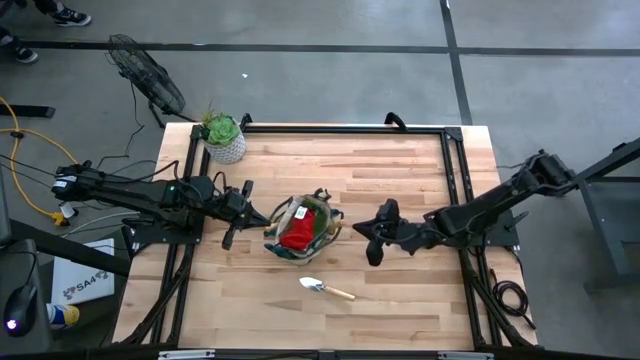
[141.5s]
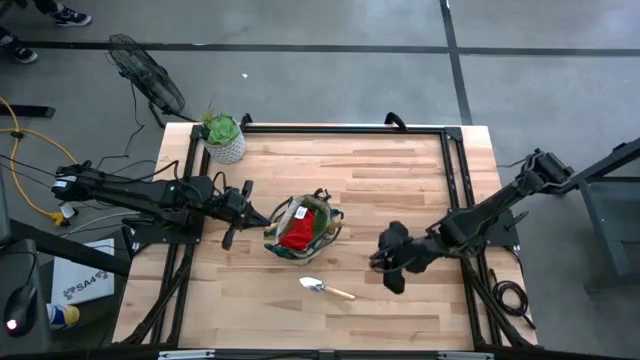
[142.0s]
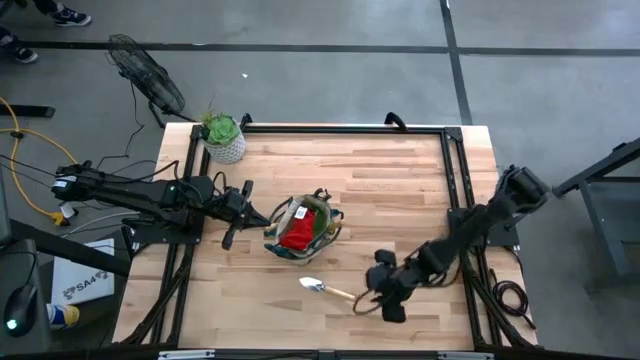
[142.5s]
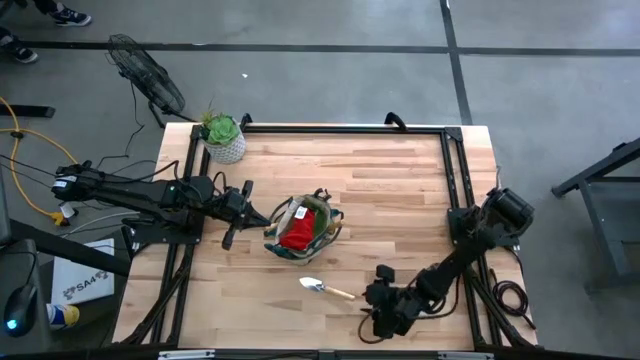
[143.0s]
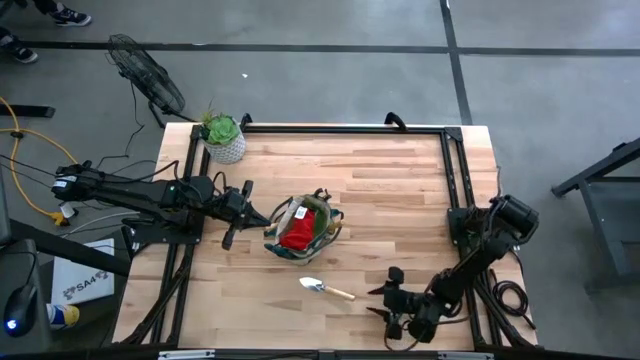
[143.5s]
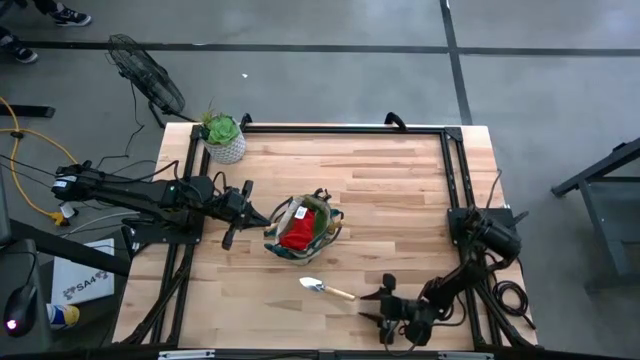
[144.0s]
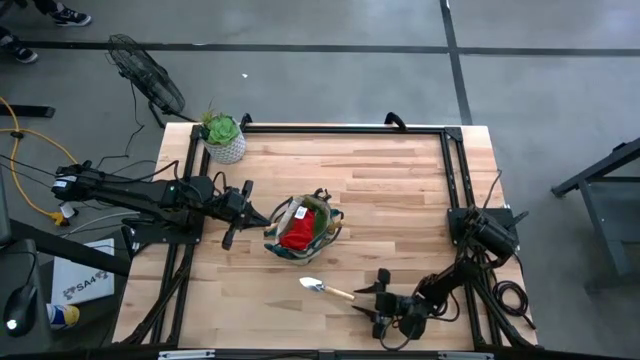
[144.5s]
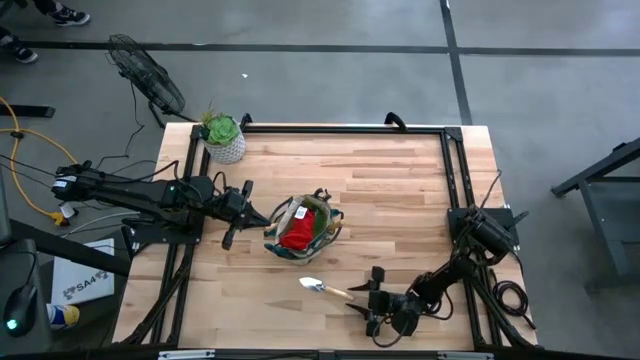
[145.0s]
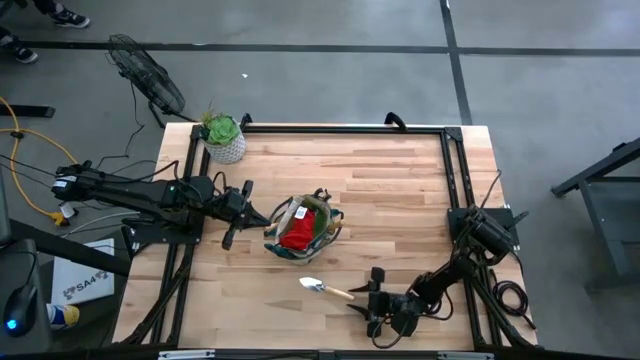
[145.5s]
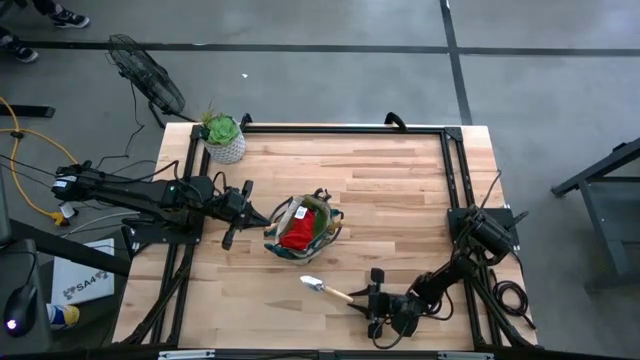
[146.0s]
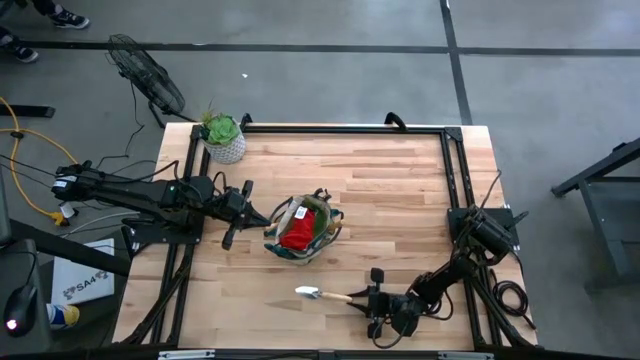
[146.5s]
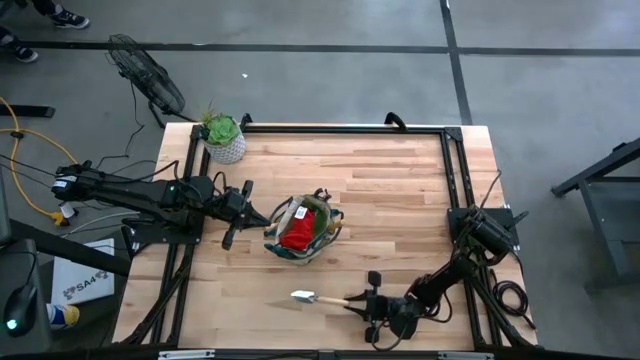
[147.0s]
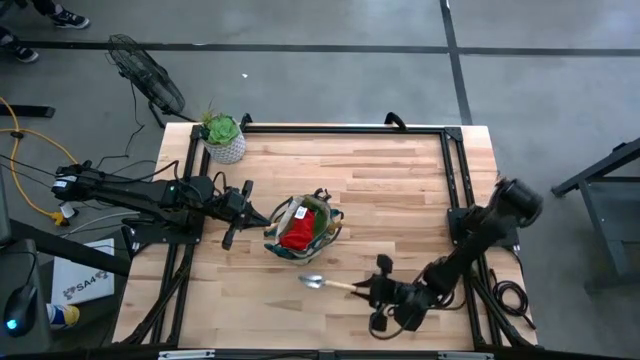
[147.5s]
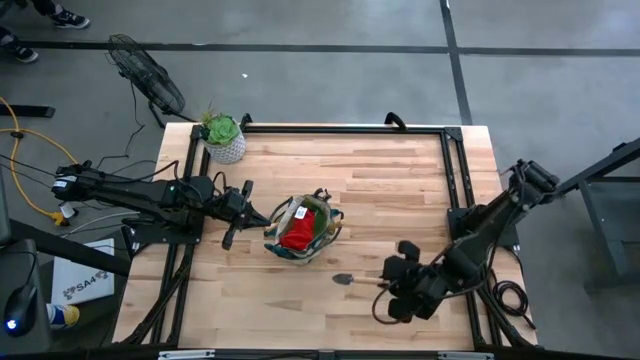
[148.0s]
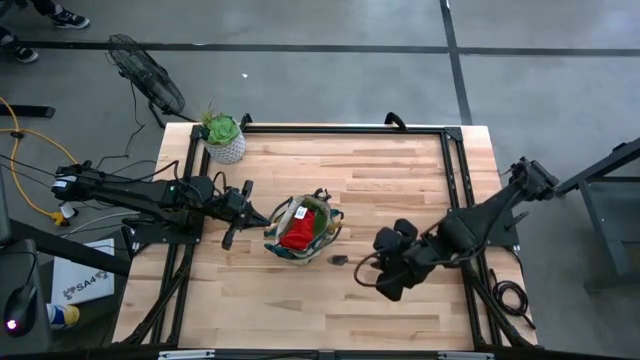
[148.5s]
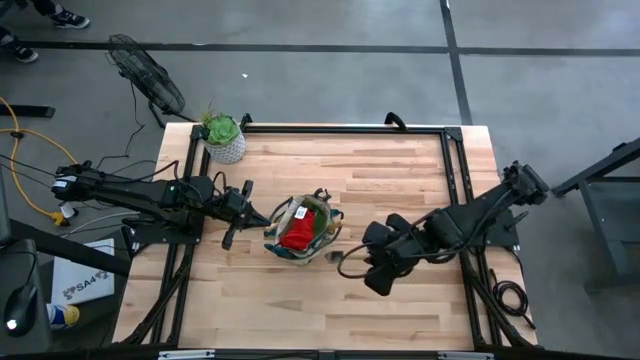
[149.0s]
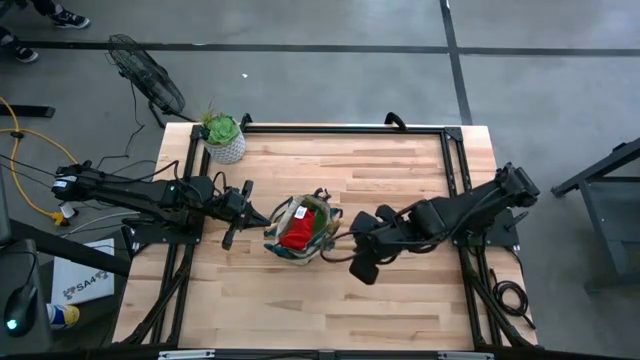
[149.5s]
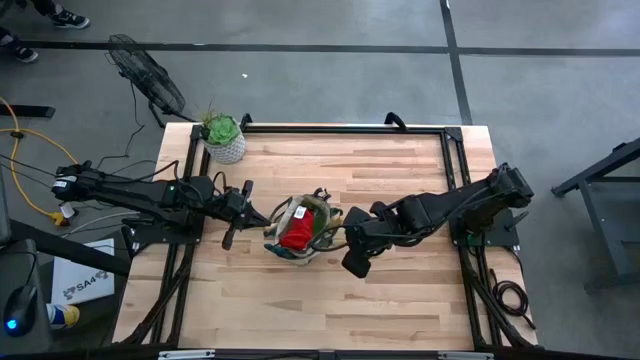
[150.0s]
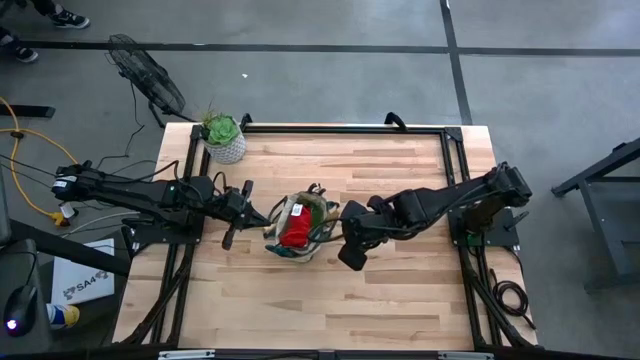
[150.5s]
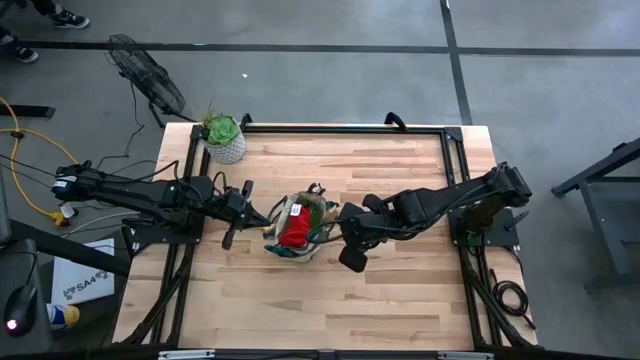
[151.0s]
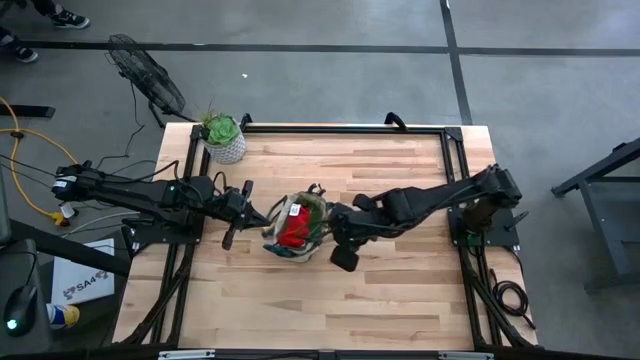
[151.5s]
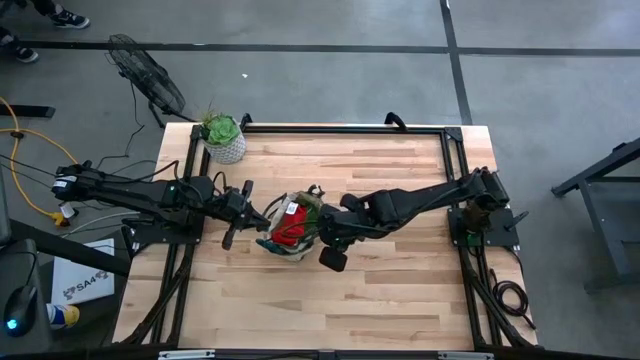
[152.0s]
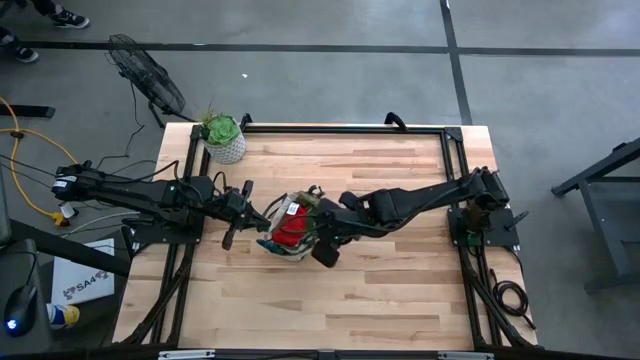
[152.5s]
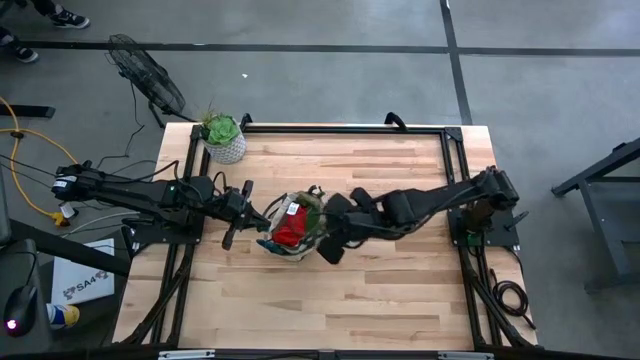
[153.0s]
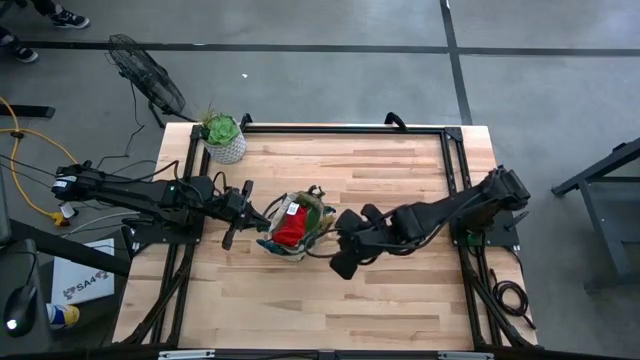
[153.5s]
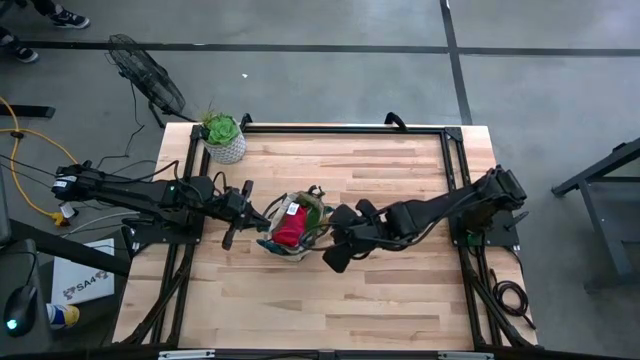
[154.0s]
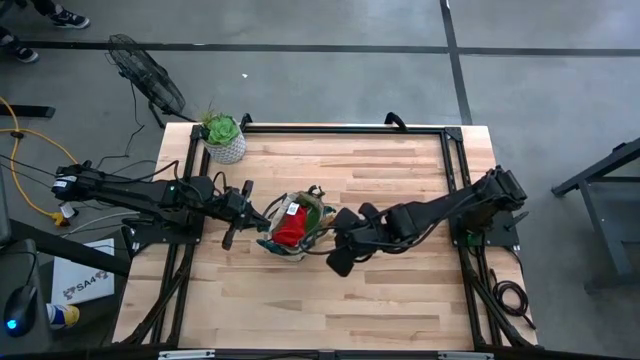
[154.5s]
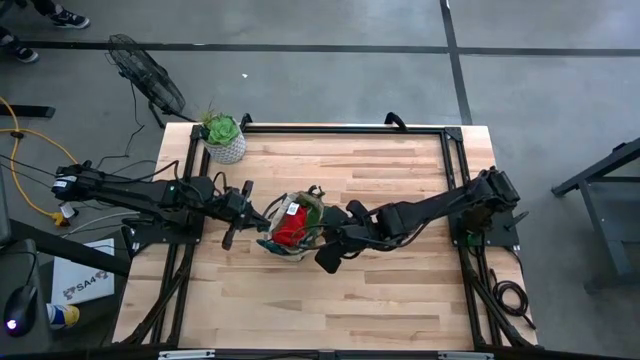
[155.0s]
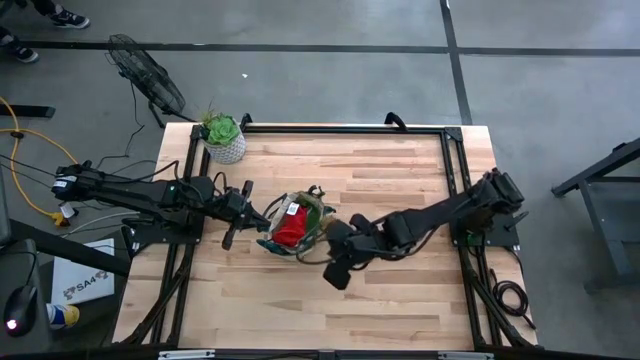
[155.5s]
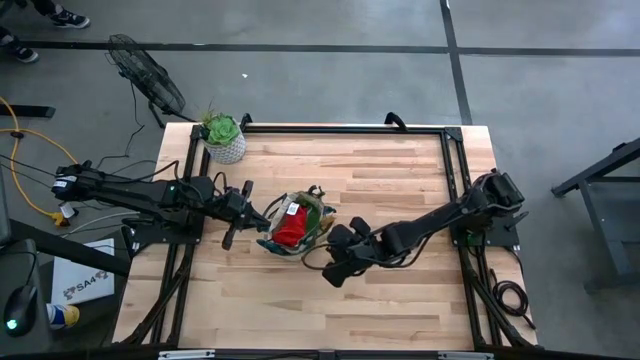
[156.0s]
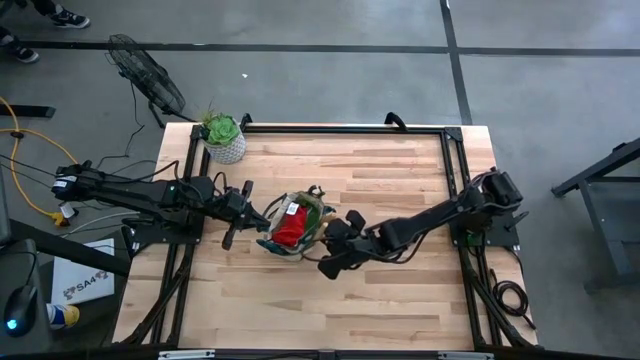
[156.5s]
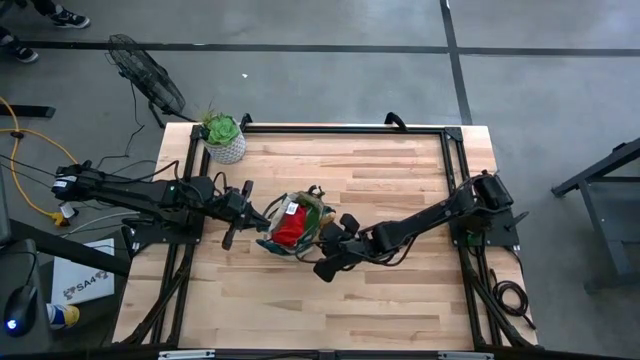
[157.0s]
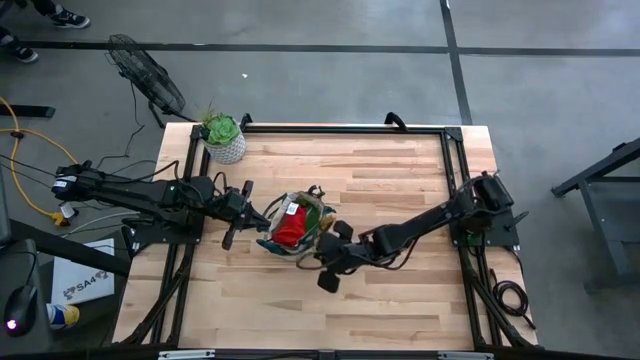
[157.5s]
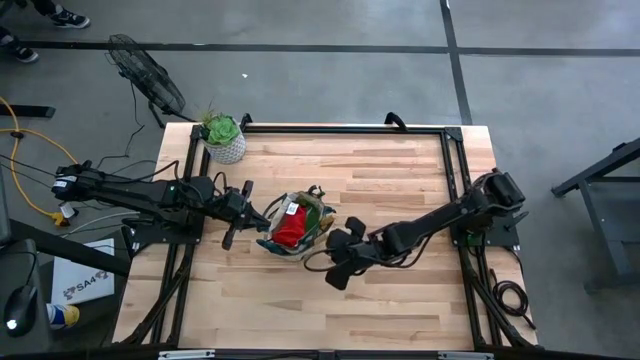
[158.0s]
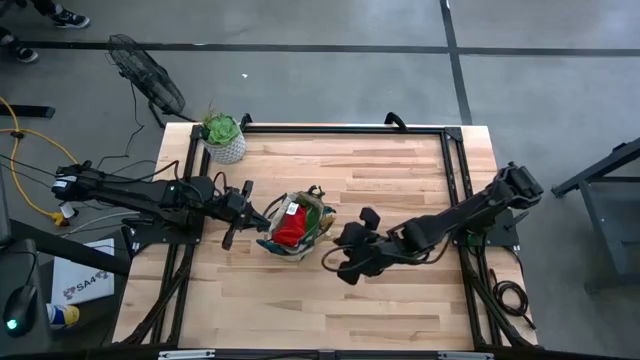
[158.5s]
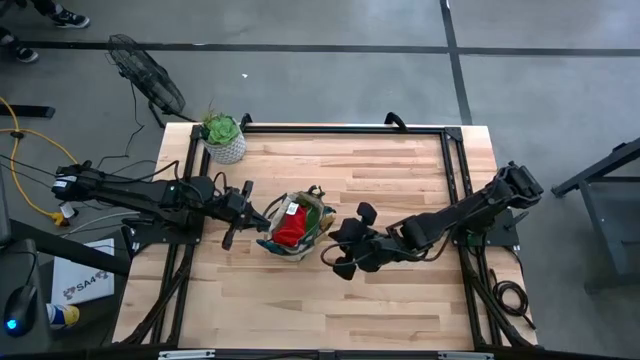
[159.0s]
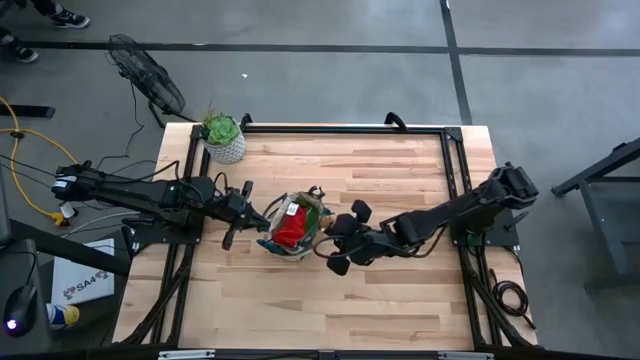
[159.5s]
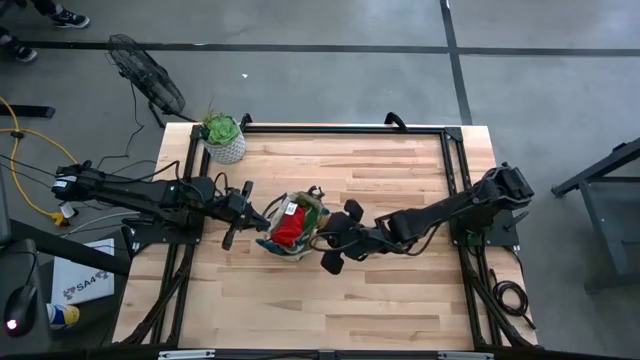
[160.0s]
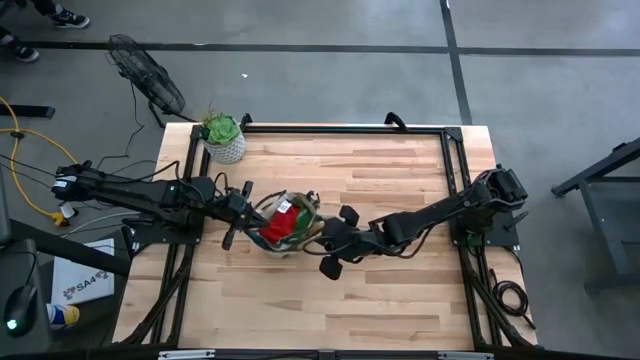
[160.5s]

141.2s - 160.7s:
Task: Pick & Place Garden tools in Gardening bag
Put the trowel into the gardening bag
